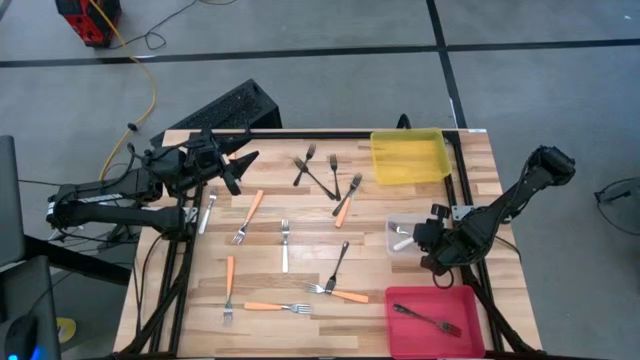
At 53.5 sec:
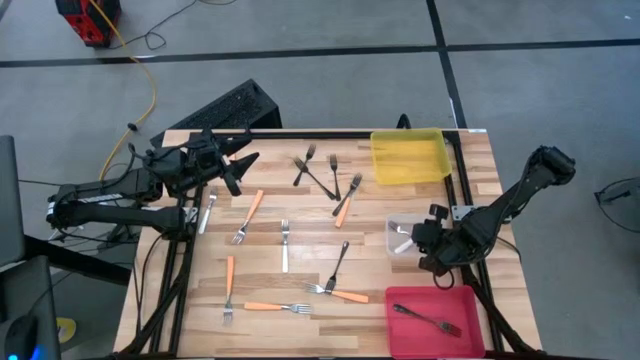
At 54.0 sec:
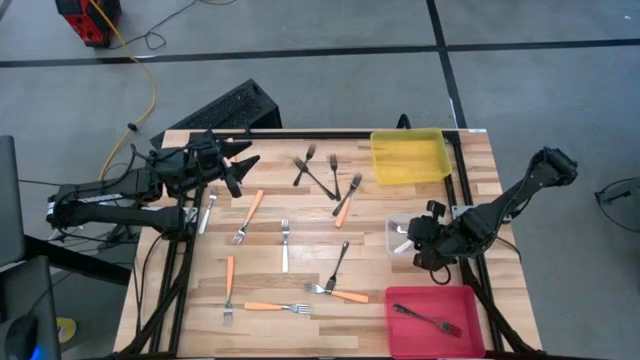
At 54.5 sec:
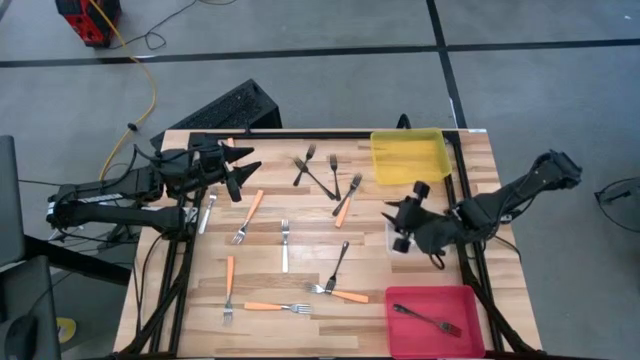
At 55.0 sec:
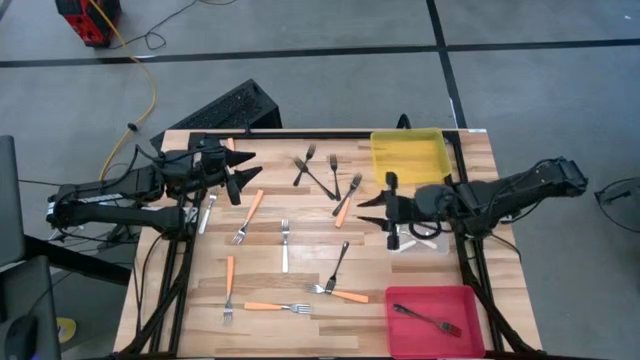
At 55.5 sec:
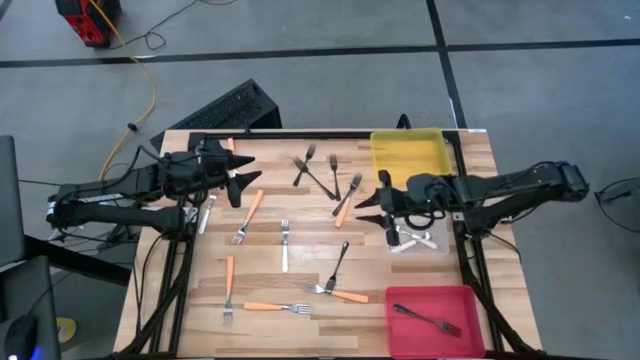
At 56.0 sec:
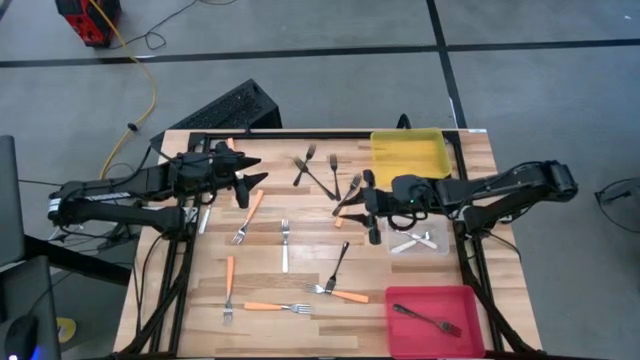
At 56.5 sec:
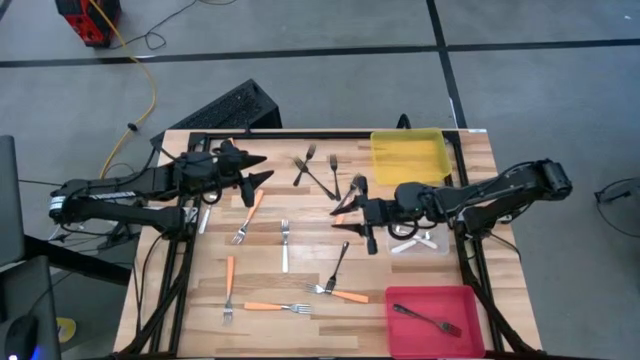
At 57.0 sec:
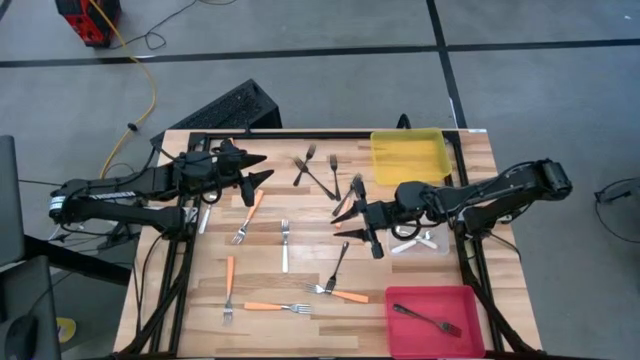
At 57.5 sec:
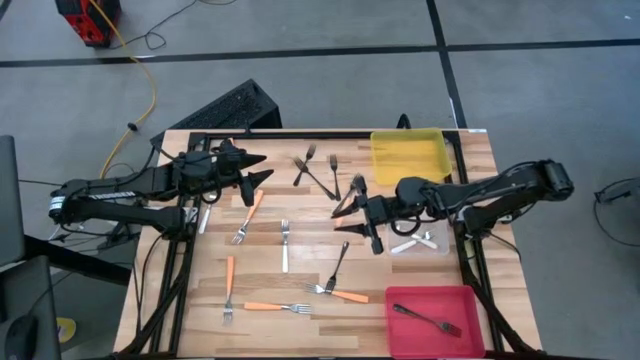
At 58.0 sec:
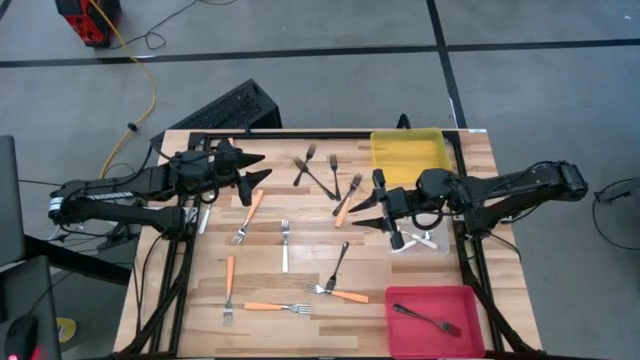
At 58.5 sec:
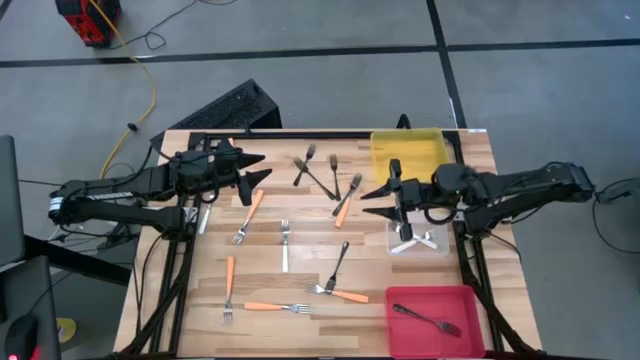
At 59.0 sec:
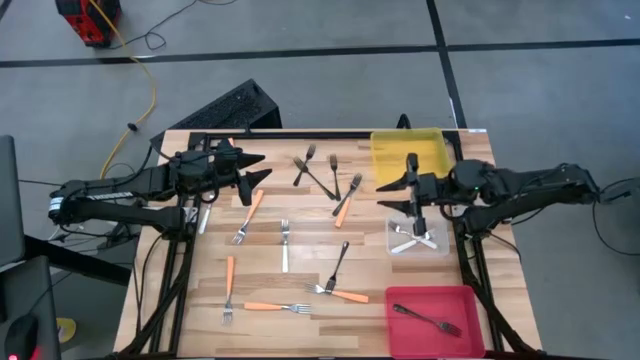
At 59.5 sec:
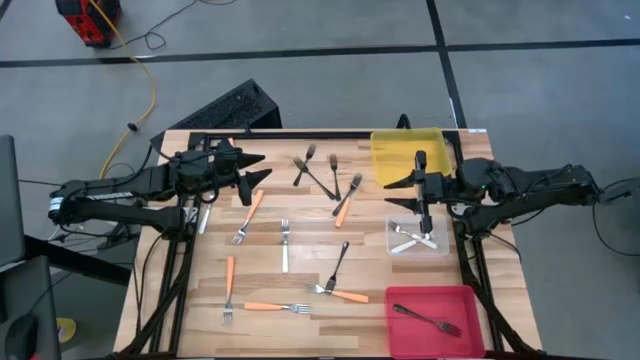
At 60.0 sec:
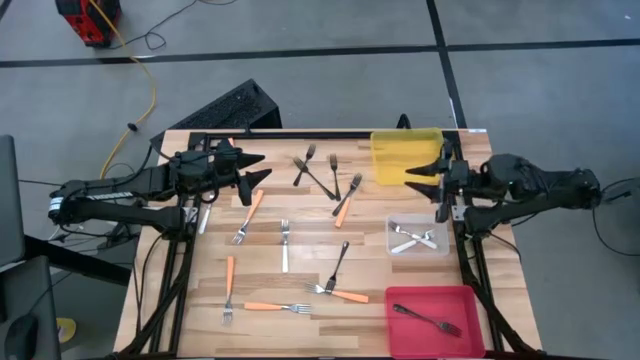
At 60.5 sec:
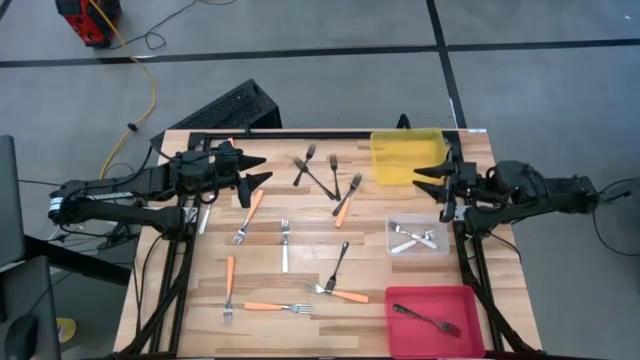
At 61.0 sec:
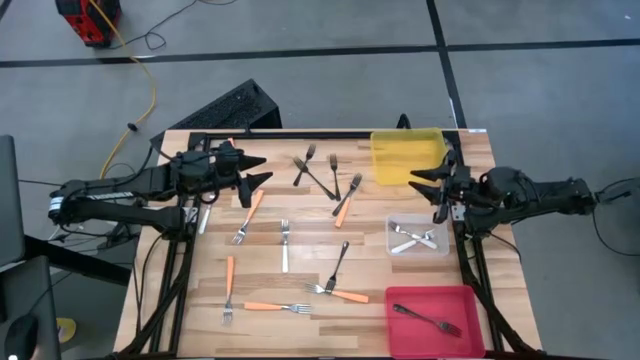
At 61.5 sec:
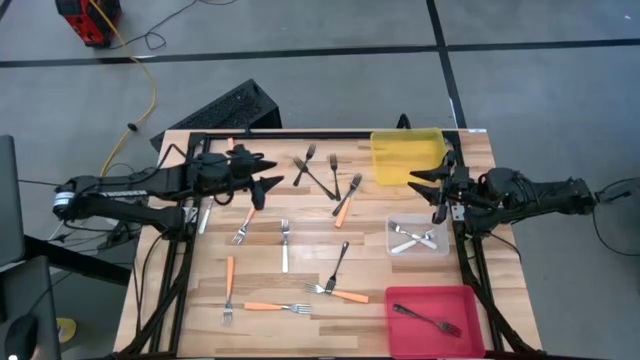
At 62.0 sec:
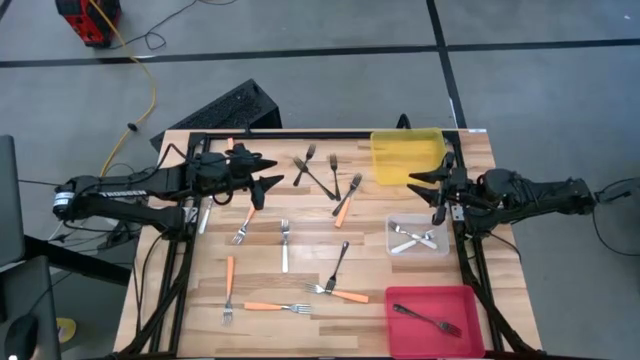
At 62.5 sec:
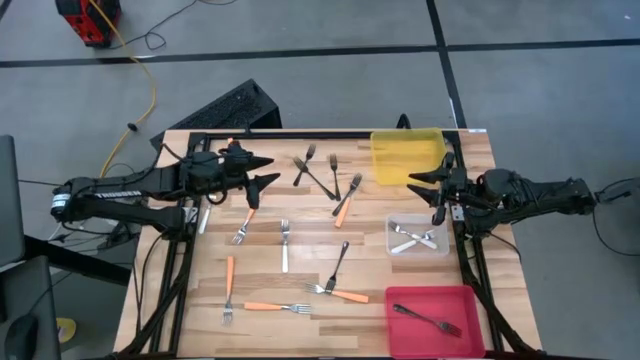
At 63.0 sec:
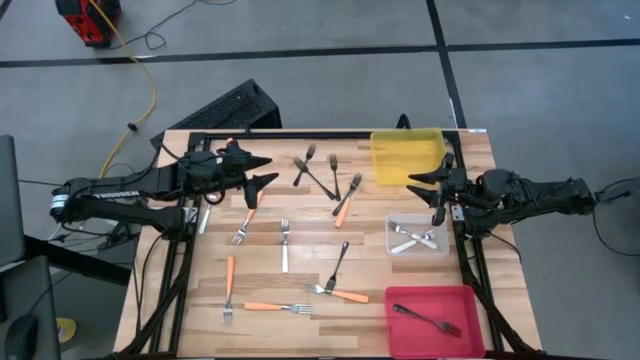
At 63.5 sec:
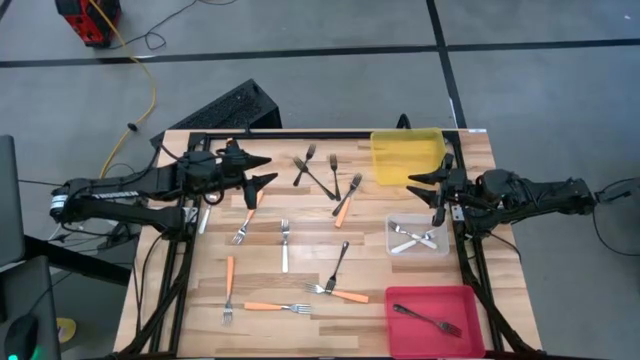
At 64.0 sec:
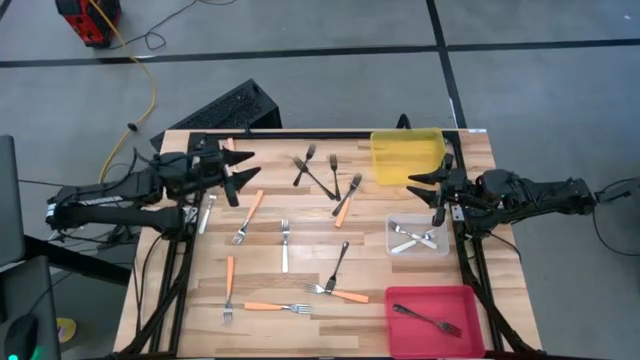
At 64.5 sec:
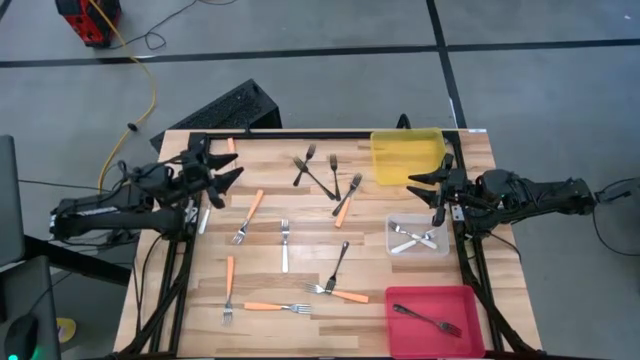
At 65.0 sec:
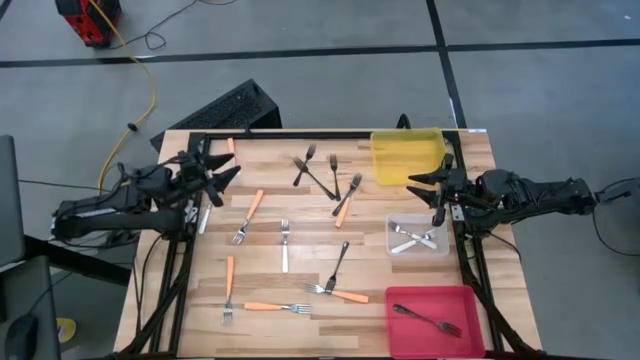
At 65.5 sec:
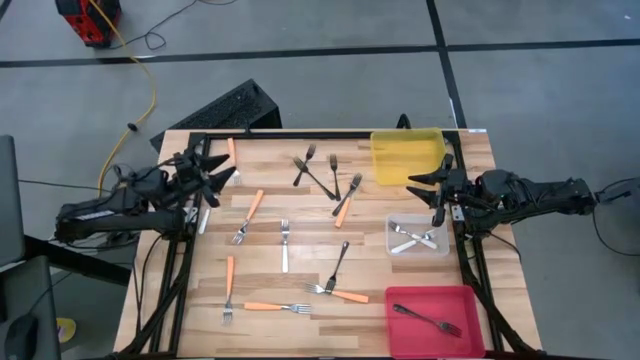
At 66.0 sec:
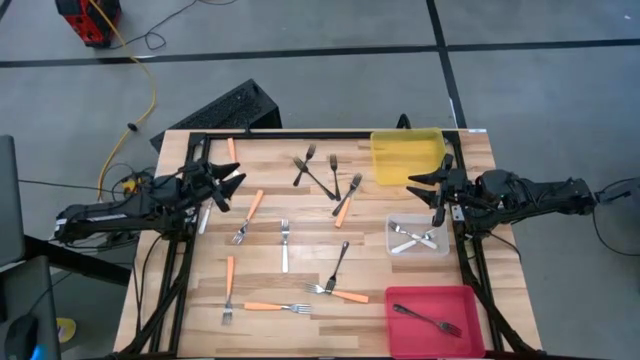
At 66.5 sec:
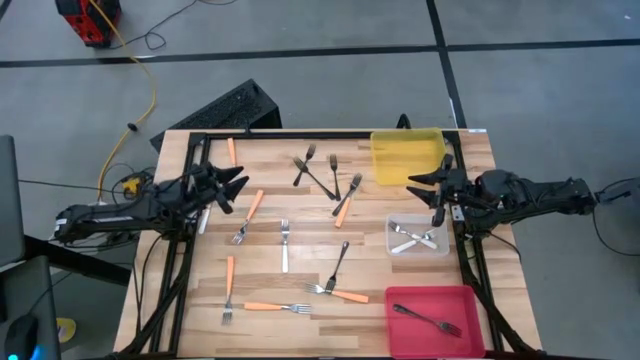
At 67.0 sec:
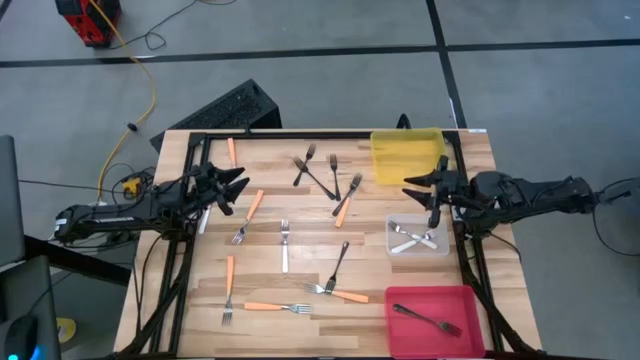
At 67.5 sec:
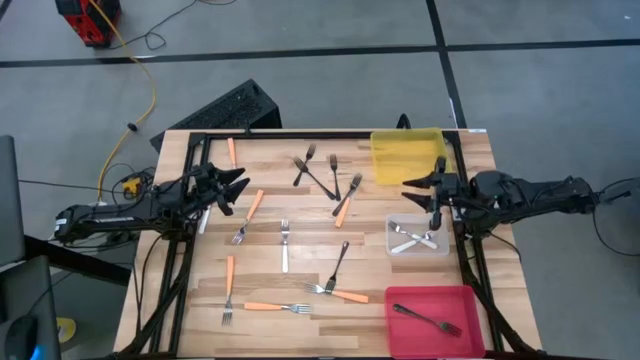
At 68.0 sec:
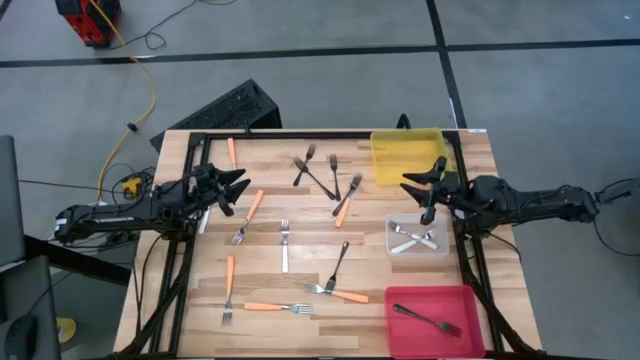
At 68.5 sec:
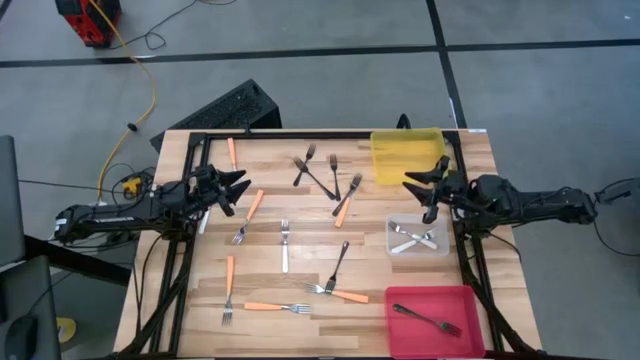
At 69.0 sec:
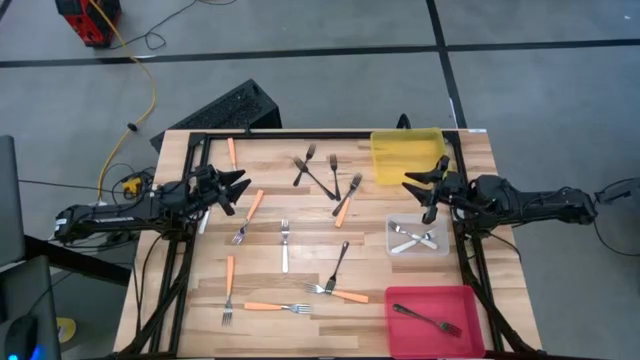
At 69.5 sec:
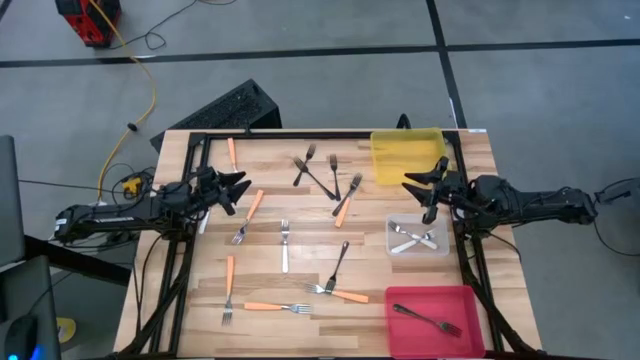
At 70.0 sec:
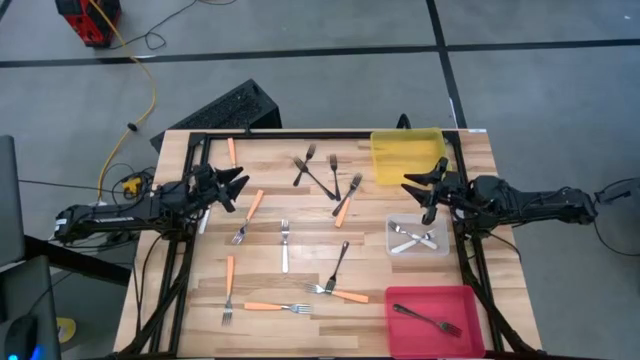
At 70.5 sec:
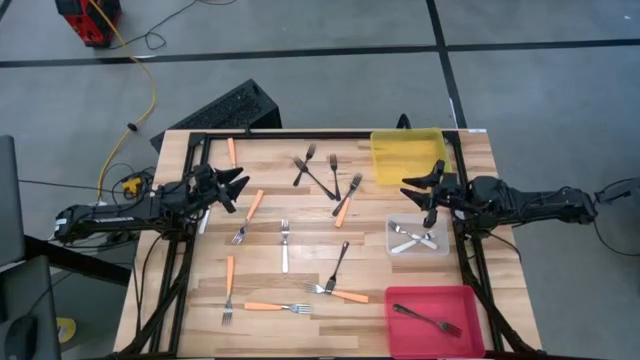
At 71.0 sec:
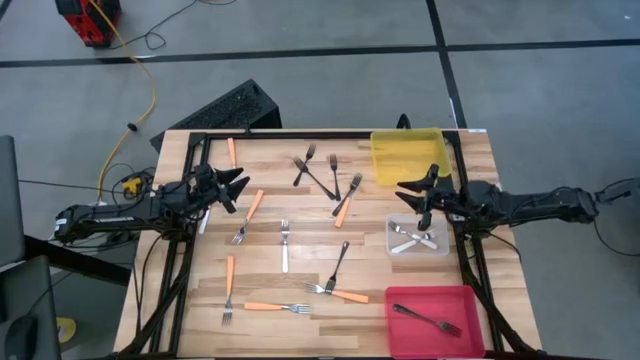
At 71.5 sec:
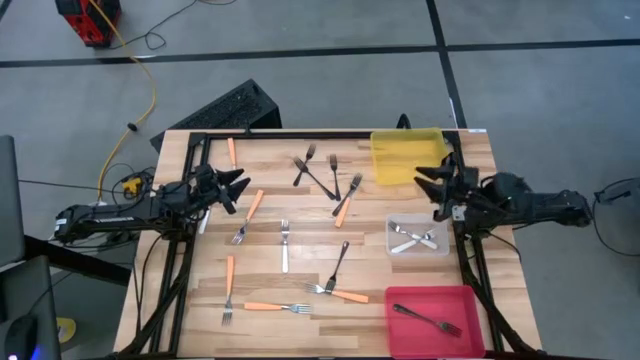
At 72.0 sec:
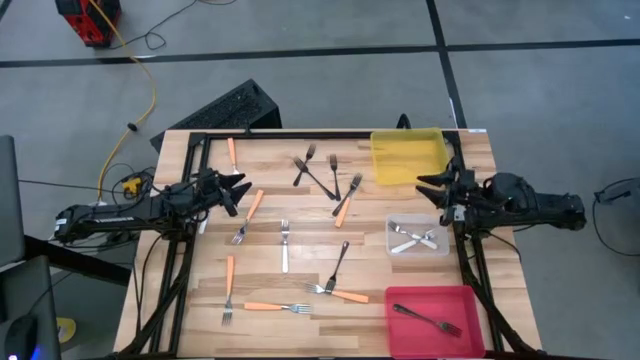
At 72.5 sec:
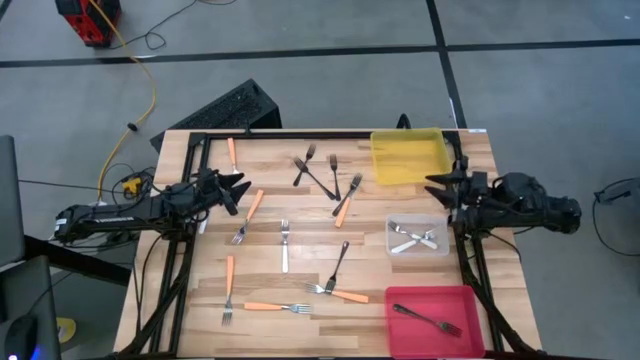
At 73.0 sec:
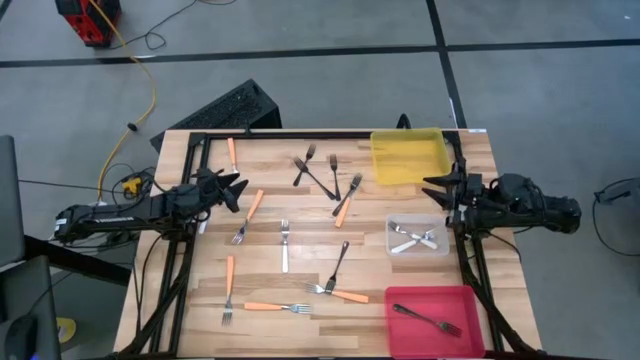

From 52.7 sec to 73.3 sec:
Task: Sort silverware by color (type)
Put the orange fork into the yellow bin
